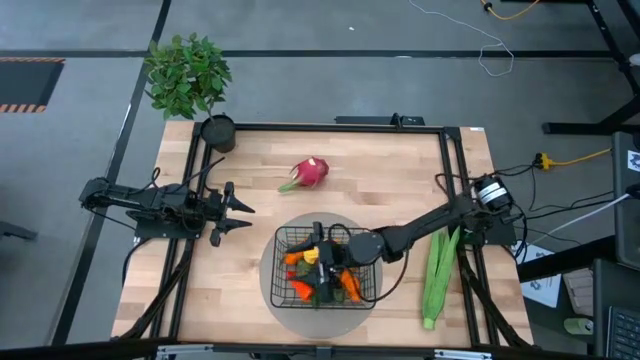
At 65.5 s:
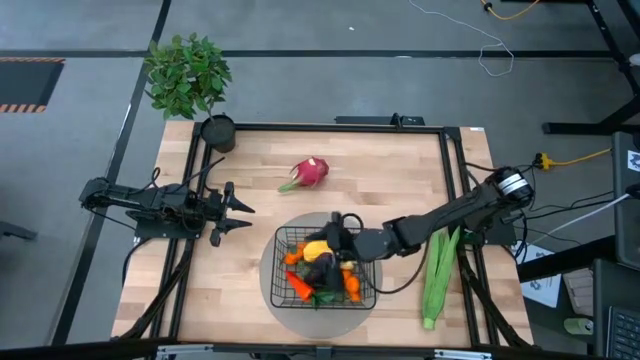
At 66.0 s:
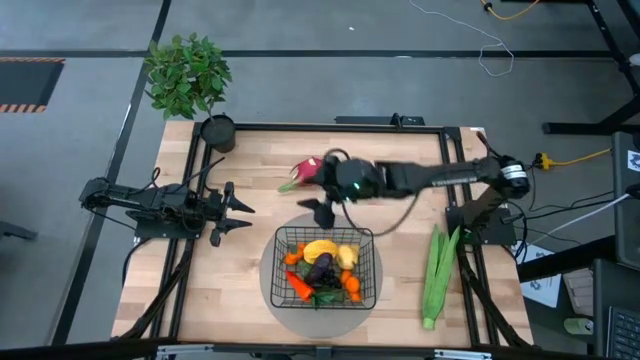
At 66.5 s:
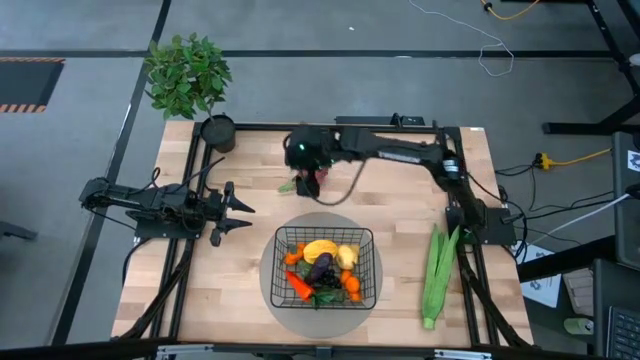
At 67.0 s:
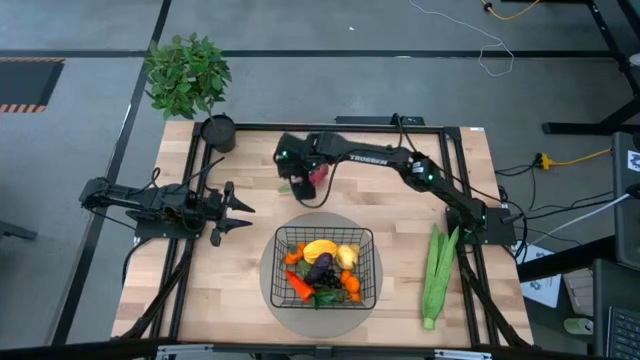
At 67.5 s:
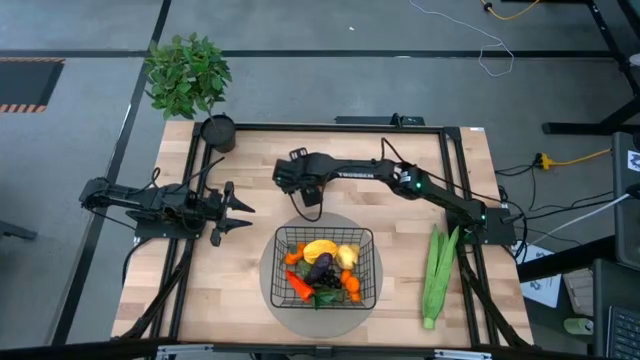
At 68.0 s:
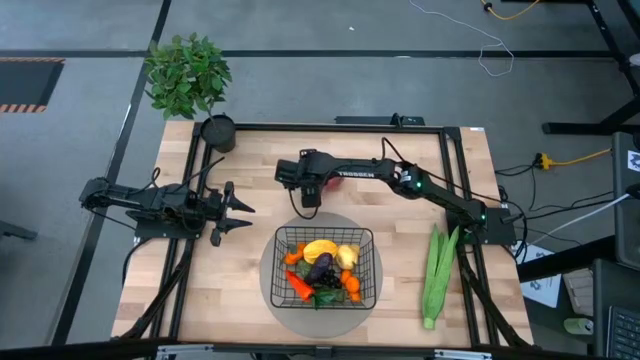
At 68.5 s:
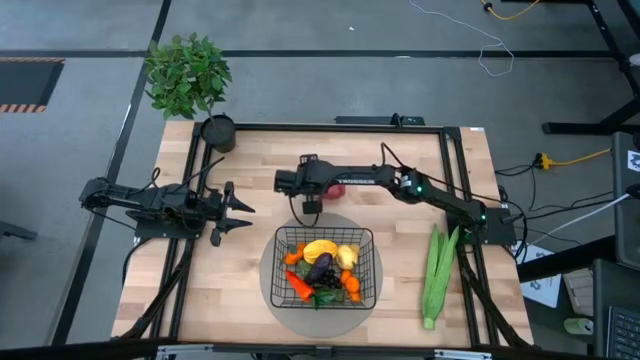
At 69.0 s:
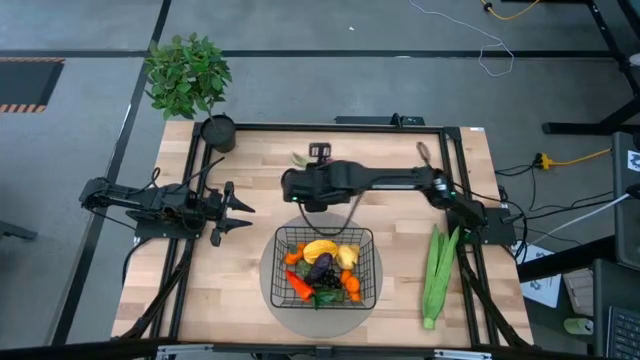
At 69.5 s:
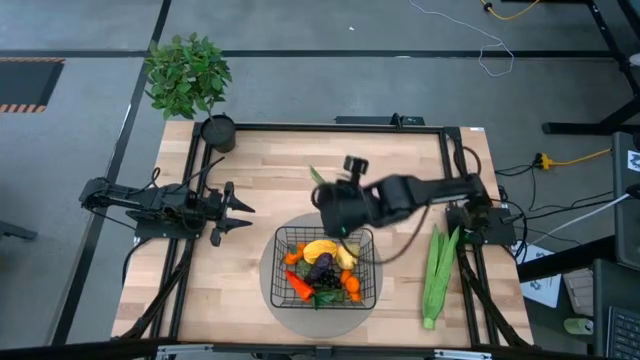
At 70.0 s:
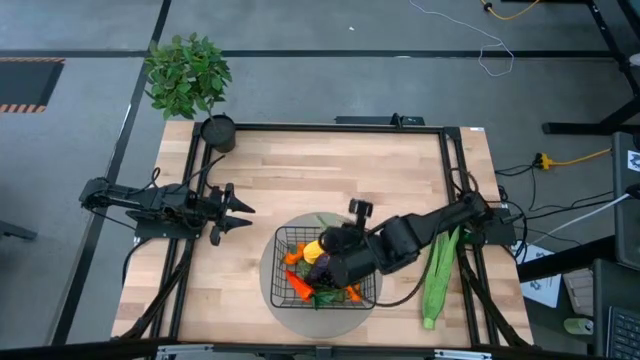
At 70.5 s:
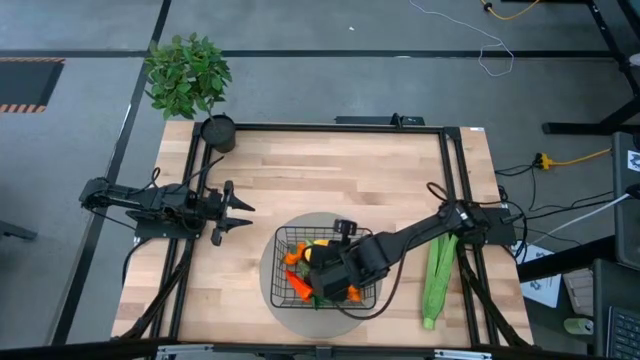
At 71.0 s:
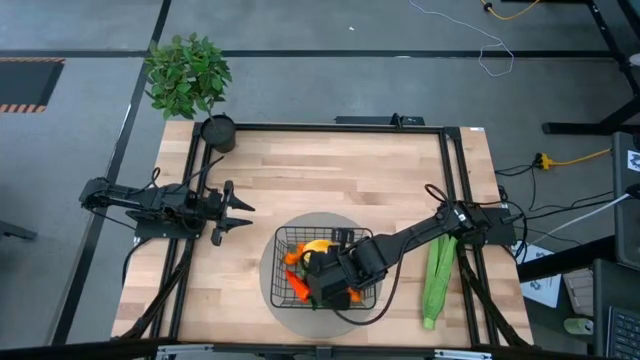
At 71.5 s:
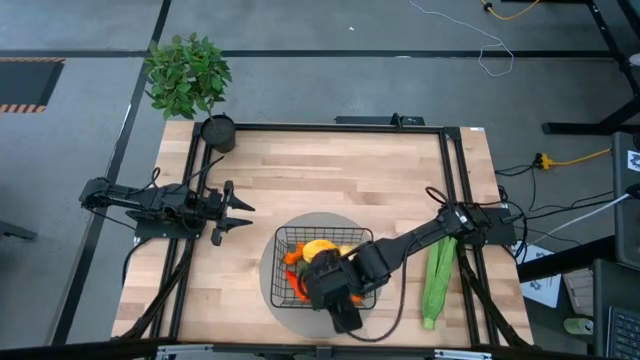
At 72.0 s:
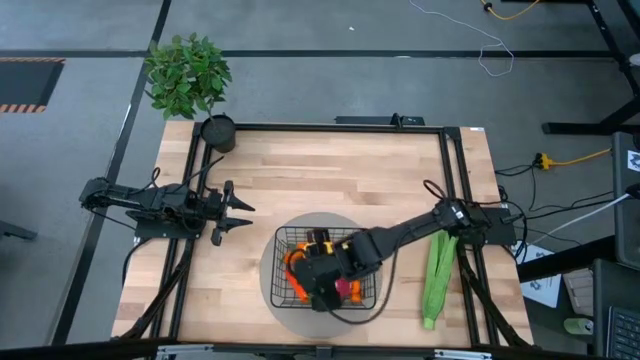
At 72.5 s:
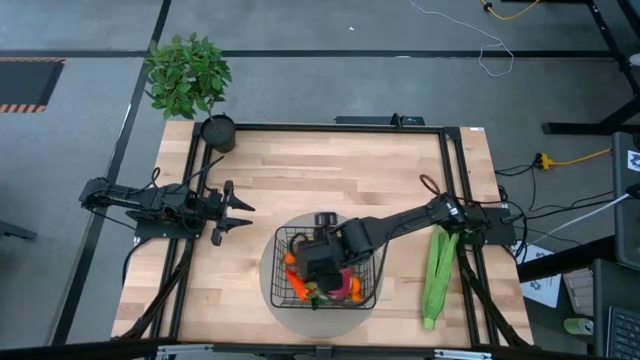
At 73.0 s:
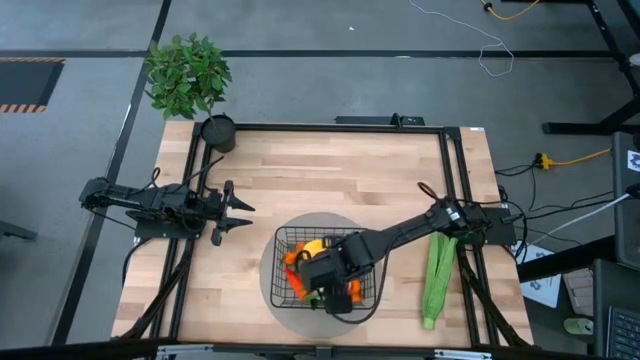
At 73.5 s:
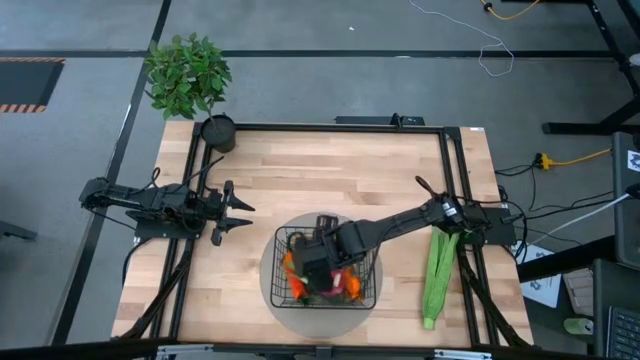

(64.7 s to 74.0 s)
Task: Build produce basket
Put the pink dragon fruit into the black wire basket

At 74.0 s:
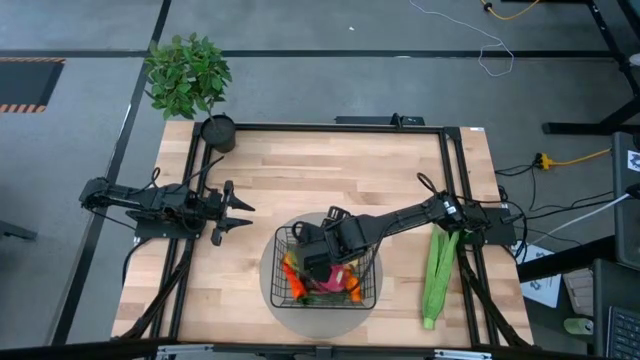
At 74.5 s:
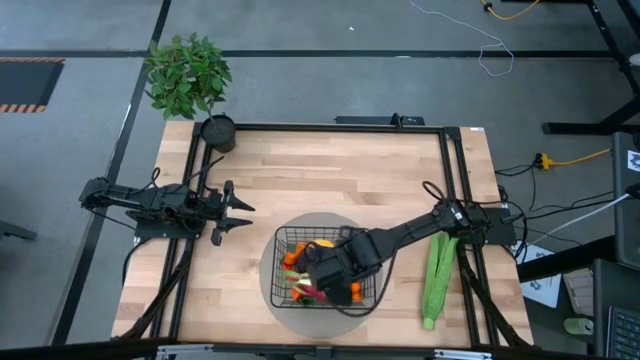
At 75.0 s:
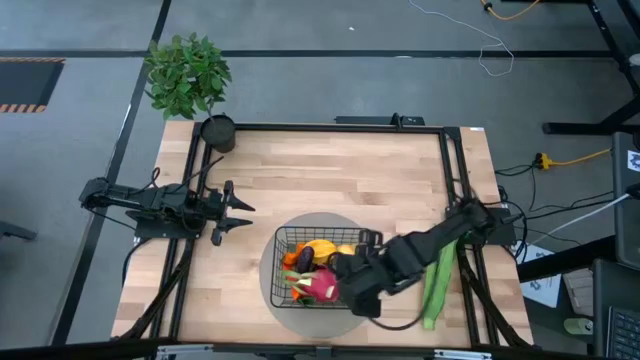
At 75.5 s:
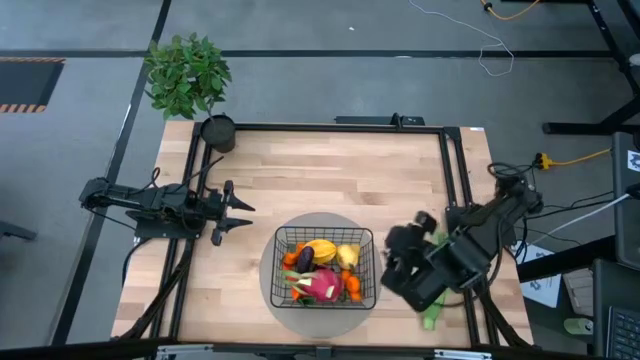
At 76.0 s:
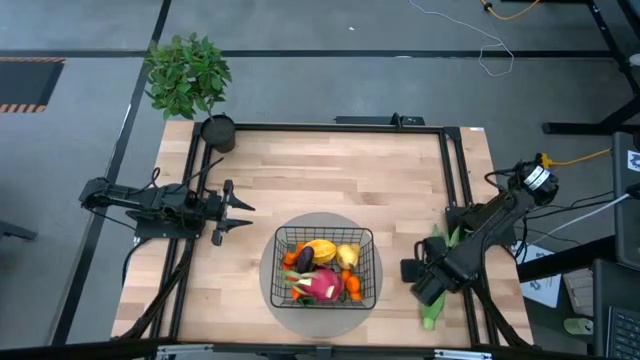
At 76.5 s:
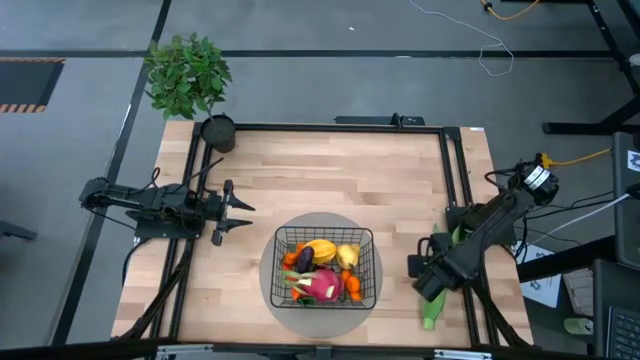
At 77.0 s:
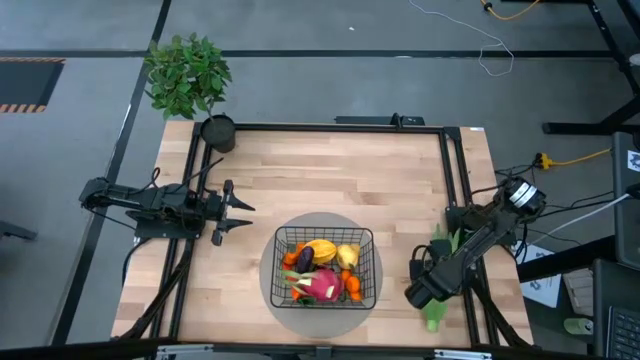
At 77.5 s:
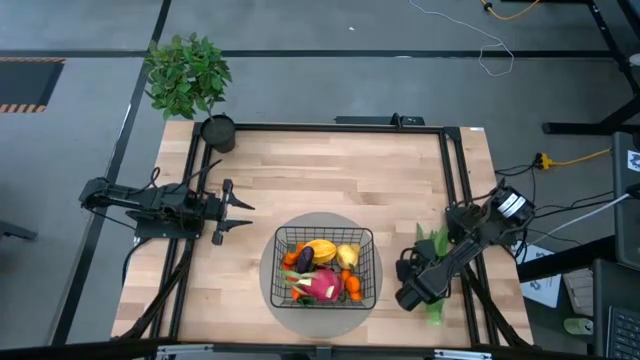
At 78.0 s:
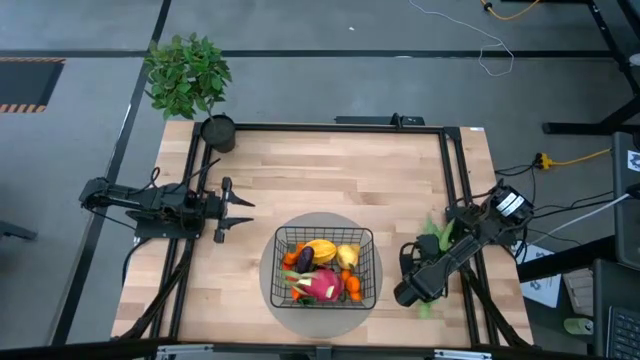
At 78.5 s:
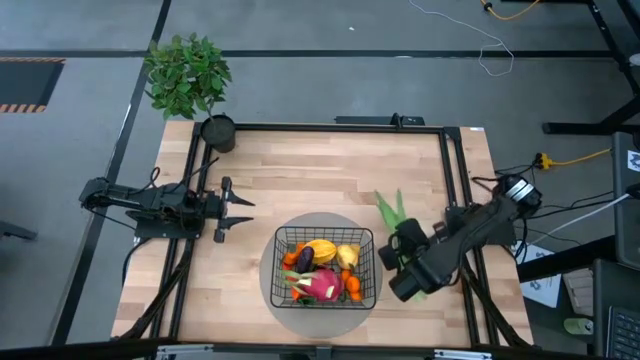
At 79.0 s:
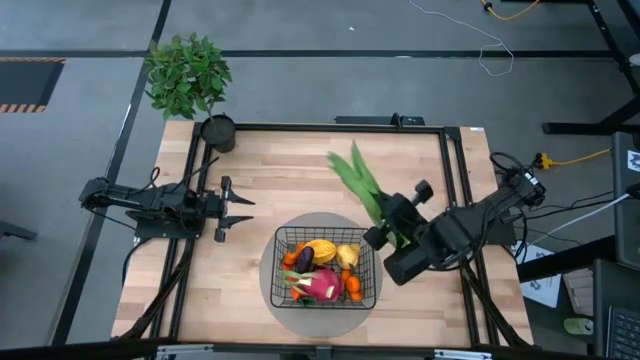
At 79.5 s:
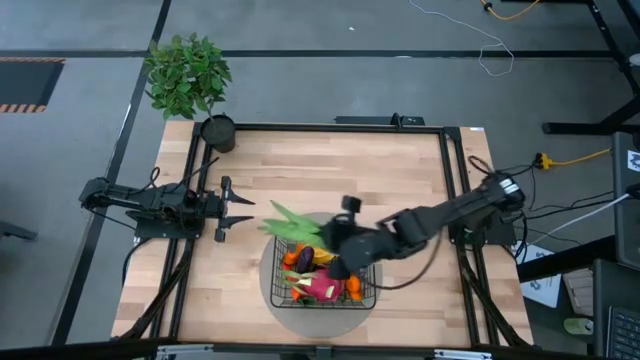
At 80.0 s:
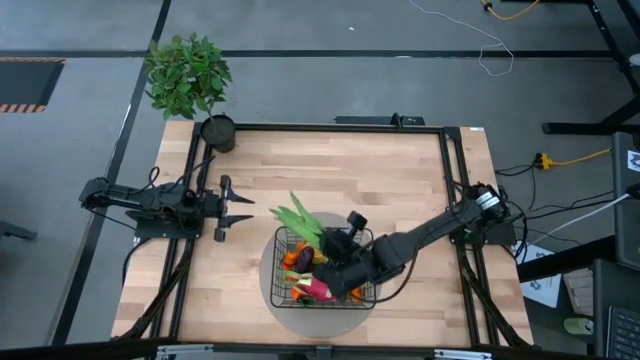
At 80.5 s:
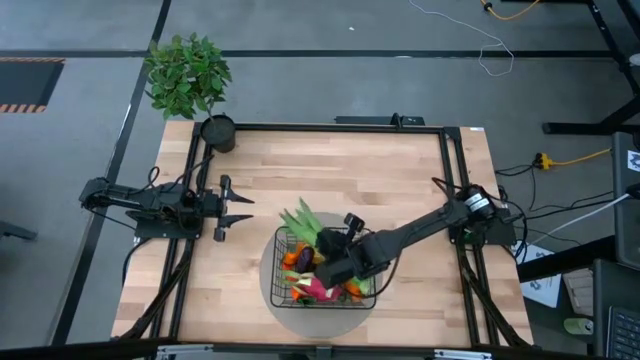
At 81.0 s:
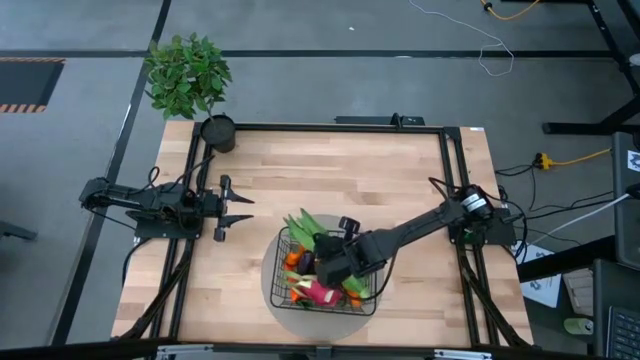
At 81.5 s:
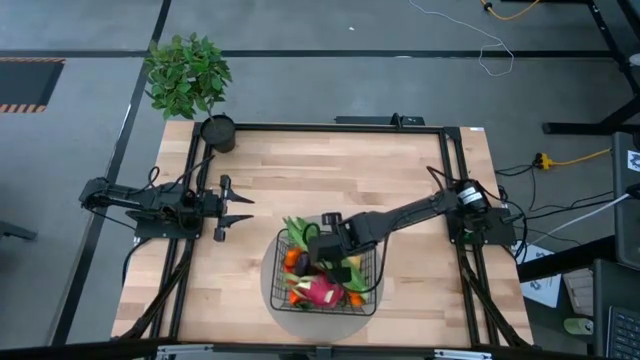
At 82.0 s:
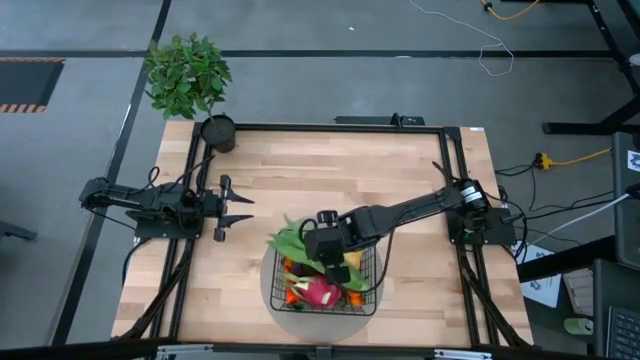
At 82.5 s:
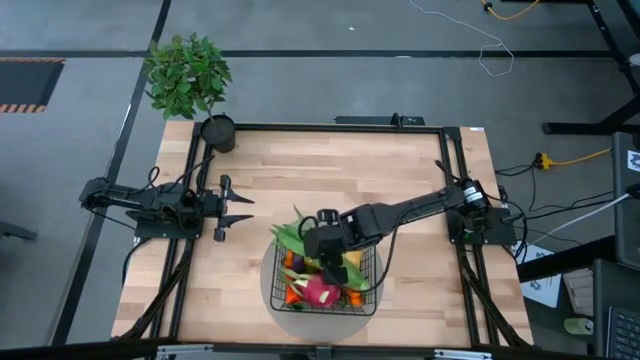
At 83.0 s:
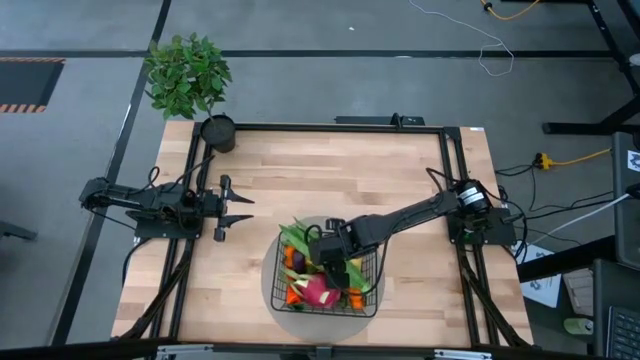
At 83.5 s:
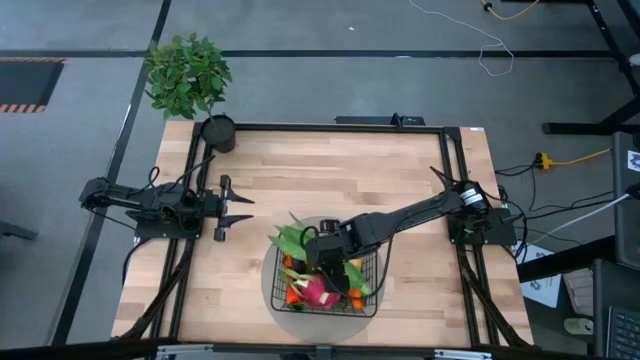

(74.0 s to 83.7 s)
Put the green leaf lettuce into the black wire basket

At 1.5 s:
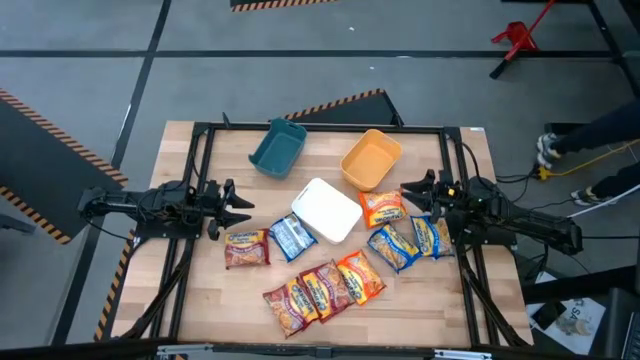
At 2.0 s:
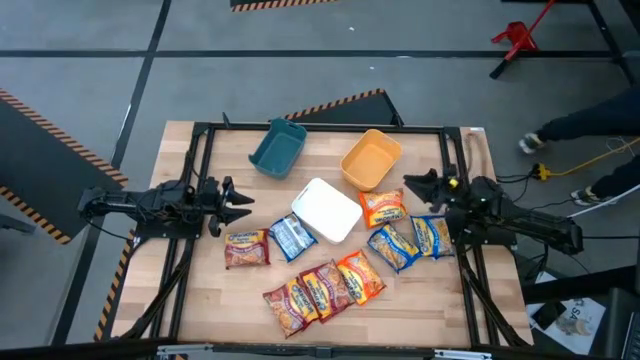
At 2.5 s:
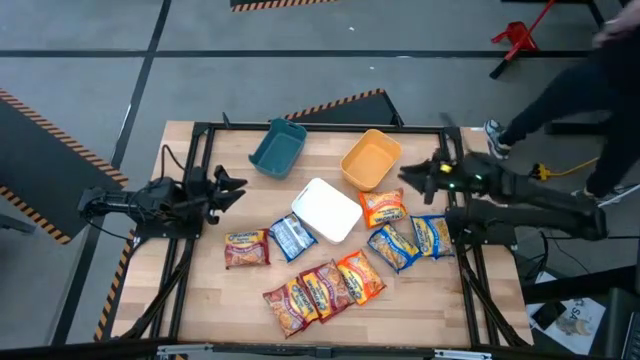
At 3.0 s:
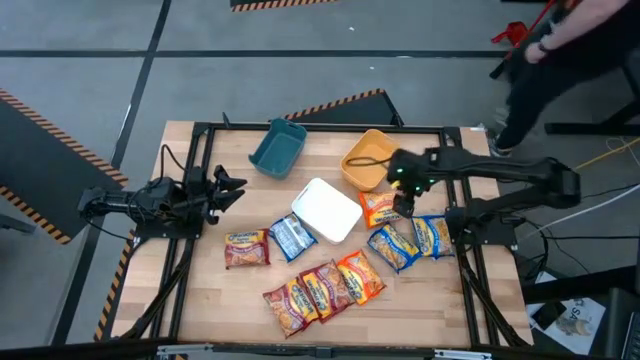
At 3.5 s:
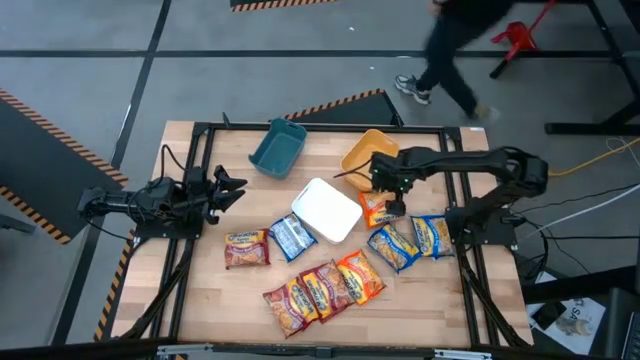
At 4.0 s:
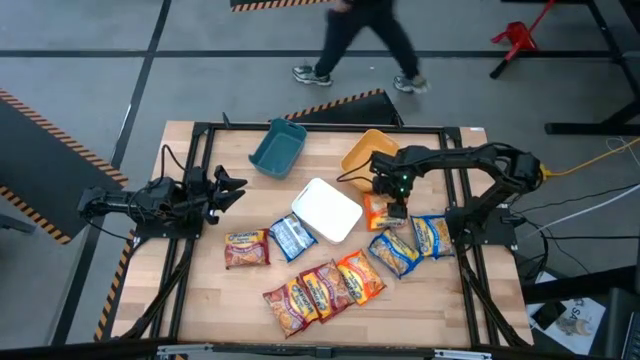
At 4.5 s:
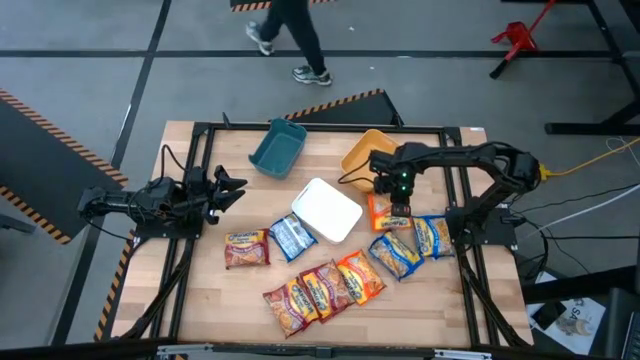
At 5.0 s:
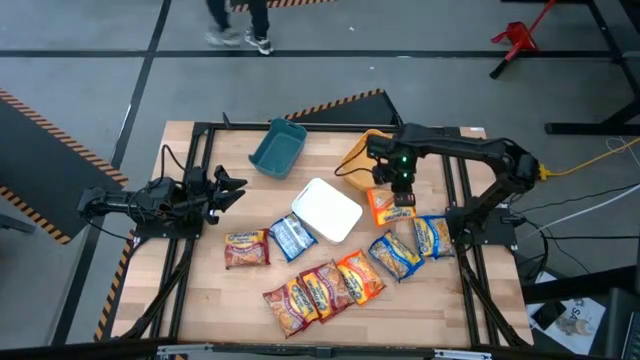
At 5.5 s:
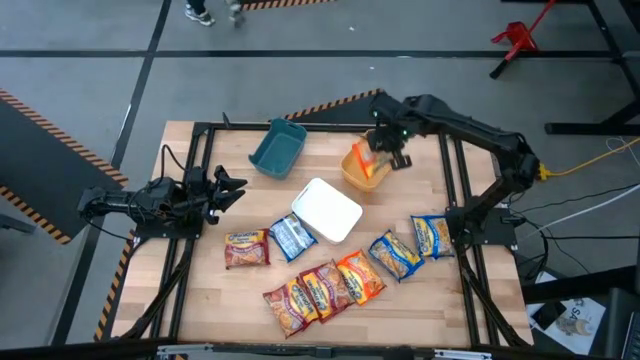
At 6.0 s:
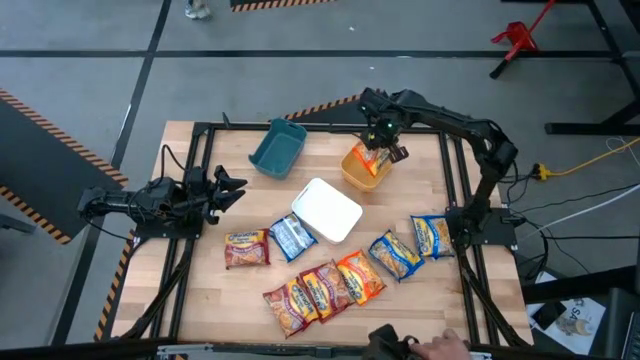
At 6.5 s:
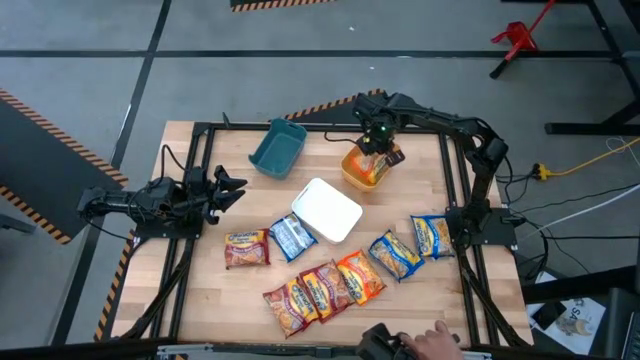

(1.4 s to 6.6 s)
Task: Sort Maruchan noodles
Put the top orange noodle pack into the yellow bin
